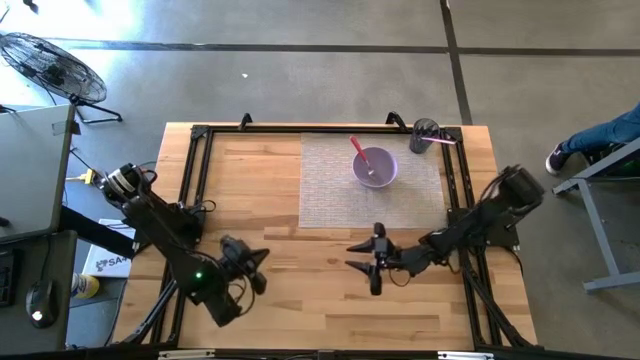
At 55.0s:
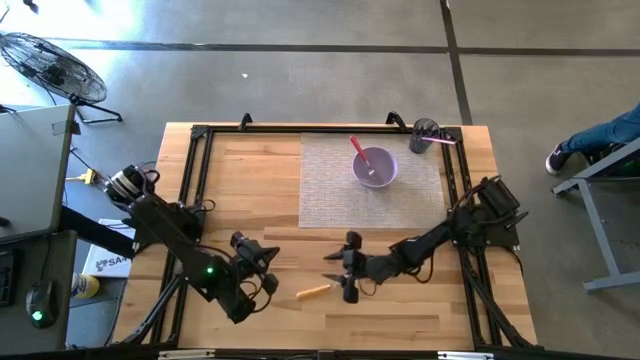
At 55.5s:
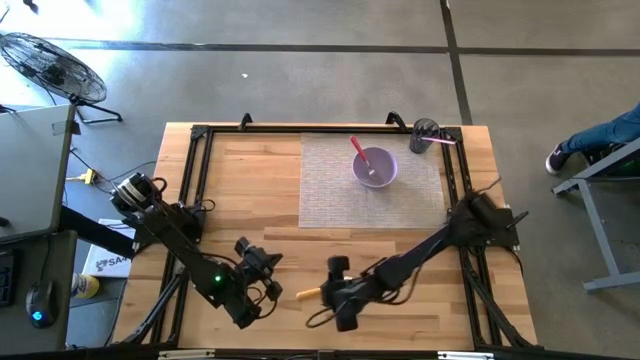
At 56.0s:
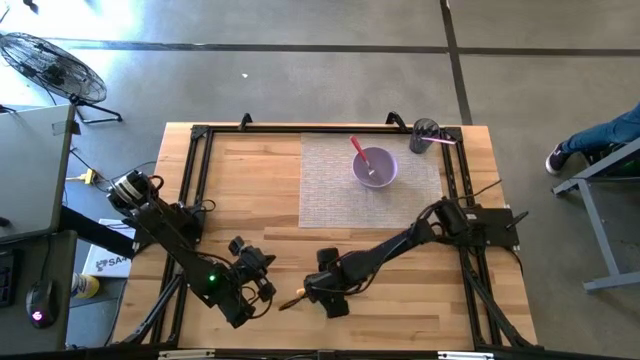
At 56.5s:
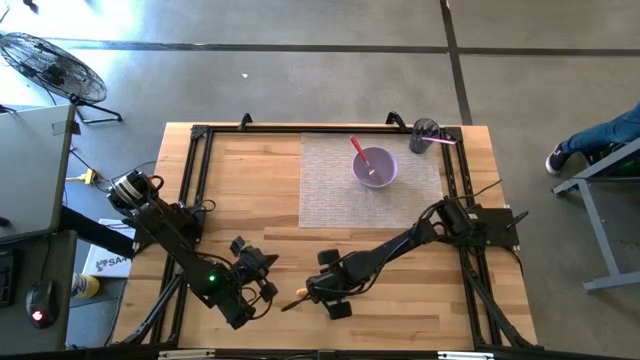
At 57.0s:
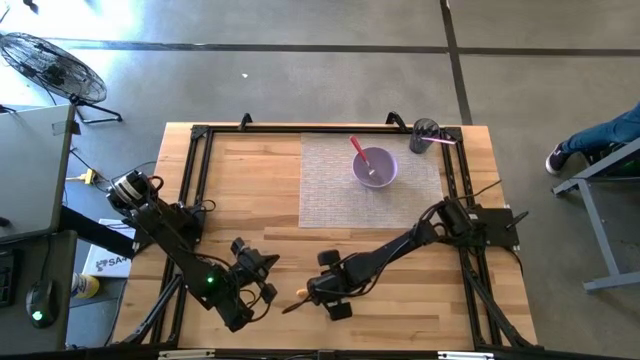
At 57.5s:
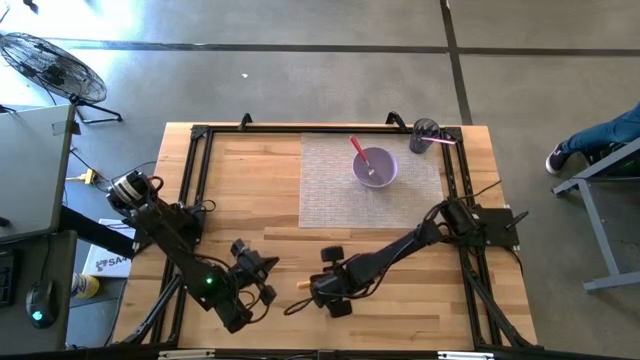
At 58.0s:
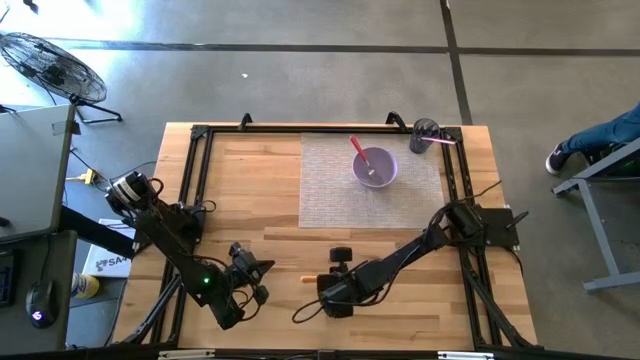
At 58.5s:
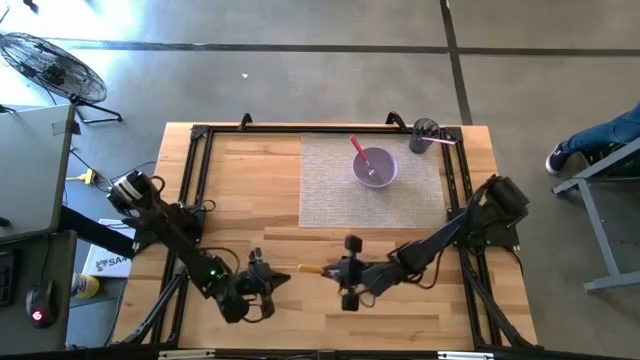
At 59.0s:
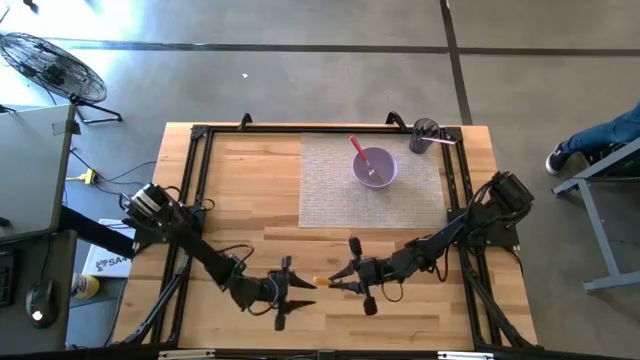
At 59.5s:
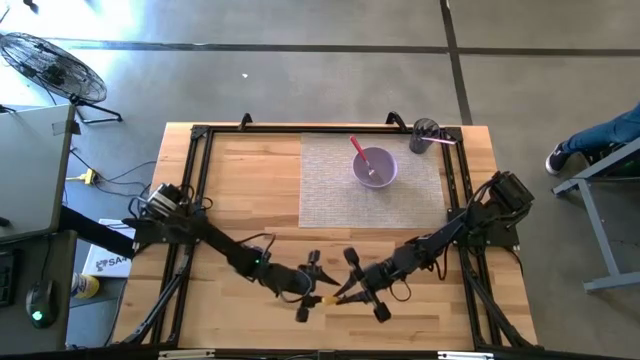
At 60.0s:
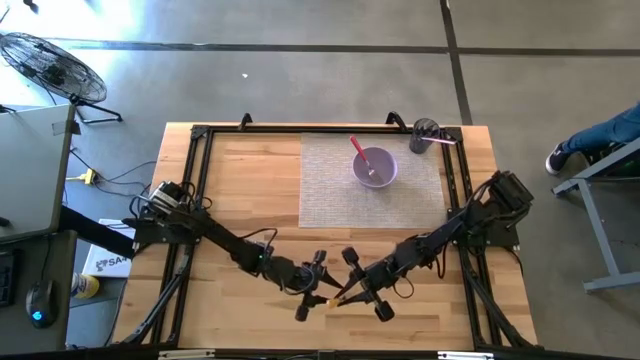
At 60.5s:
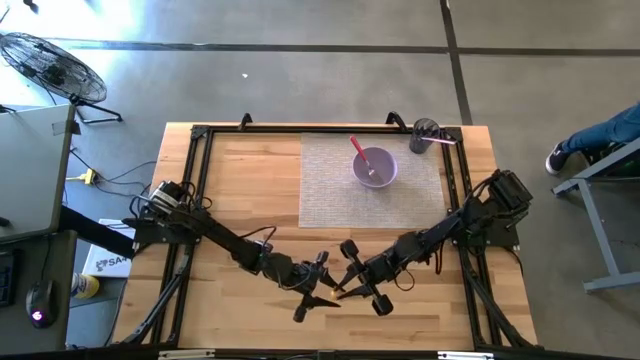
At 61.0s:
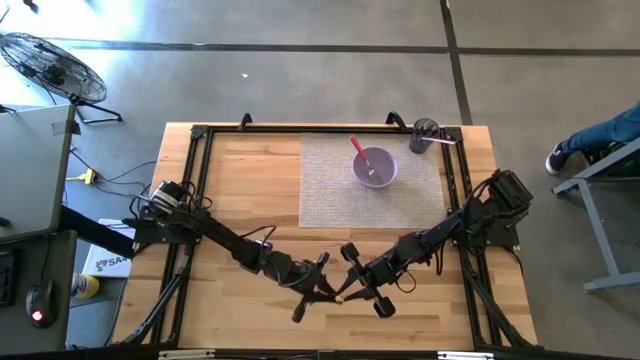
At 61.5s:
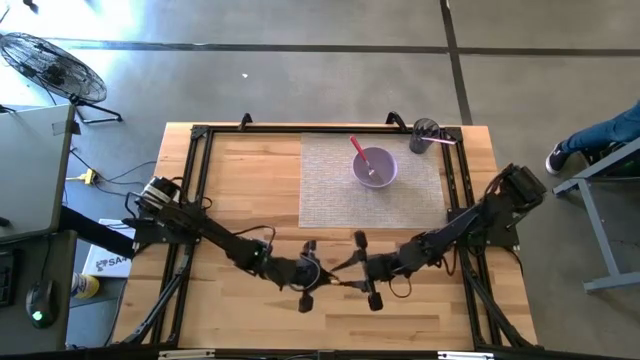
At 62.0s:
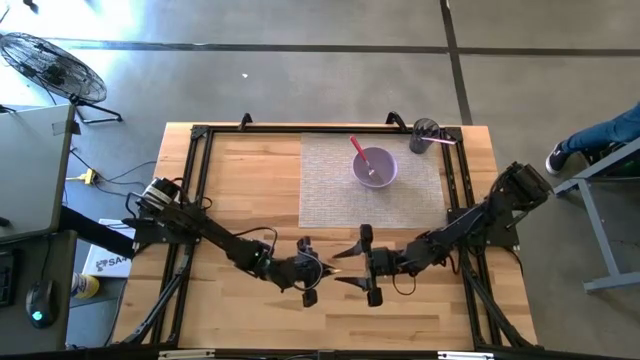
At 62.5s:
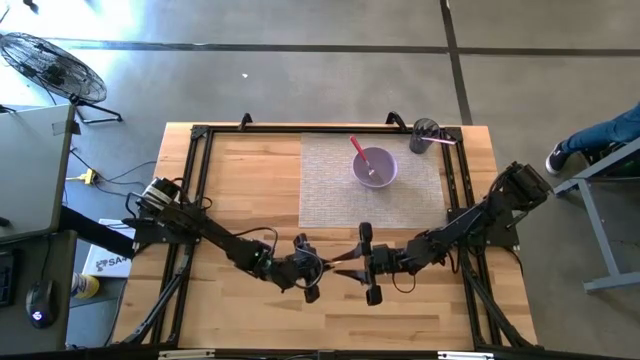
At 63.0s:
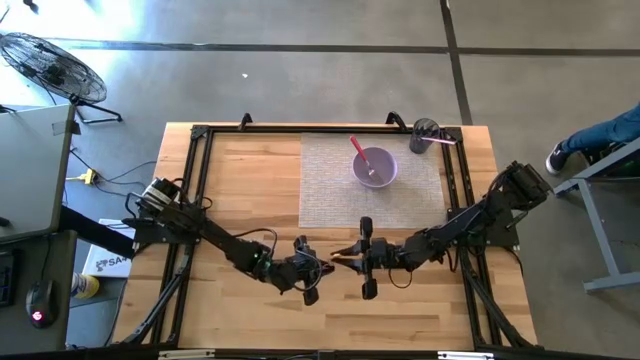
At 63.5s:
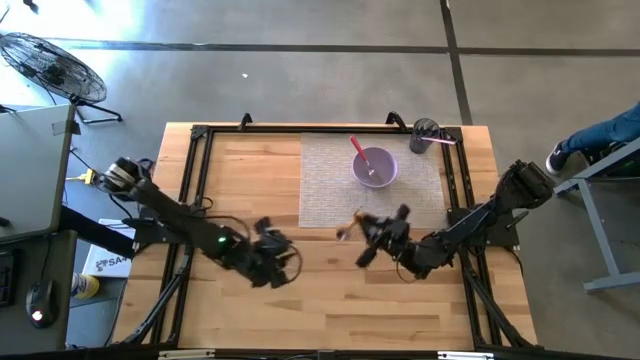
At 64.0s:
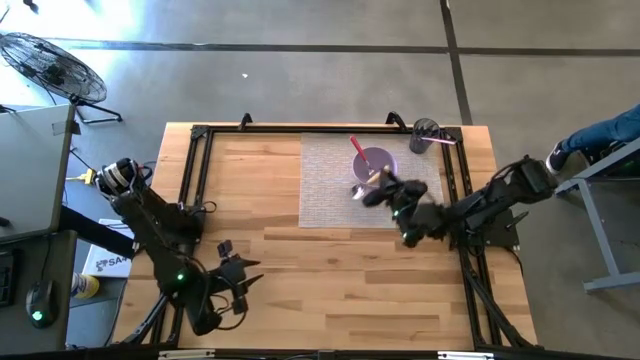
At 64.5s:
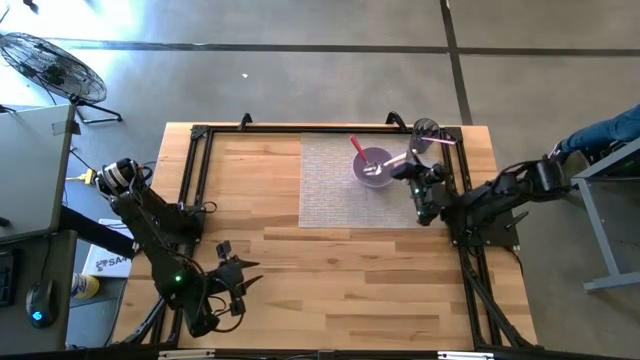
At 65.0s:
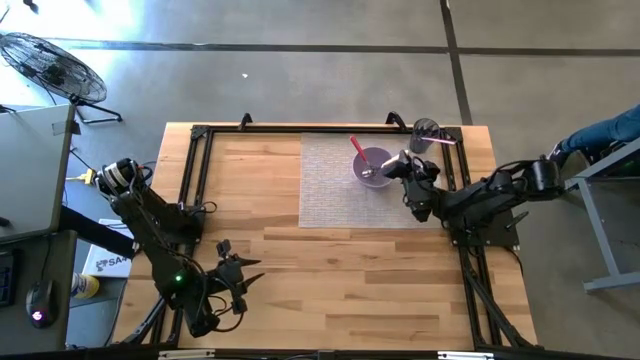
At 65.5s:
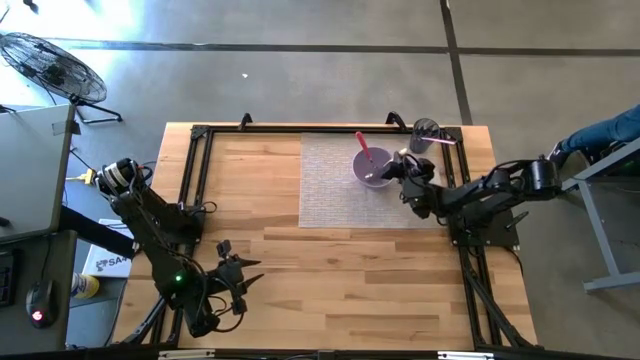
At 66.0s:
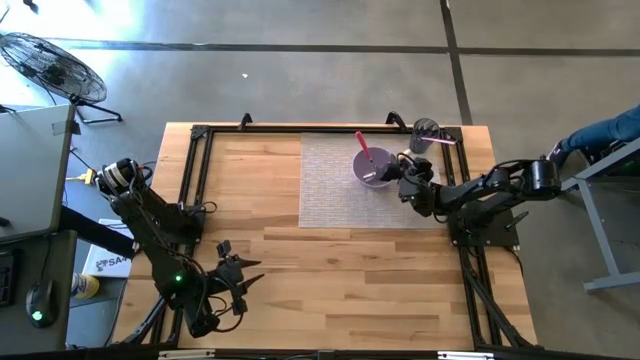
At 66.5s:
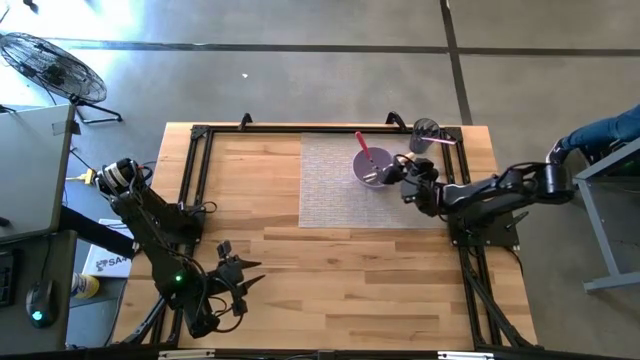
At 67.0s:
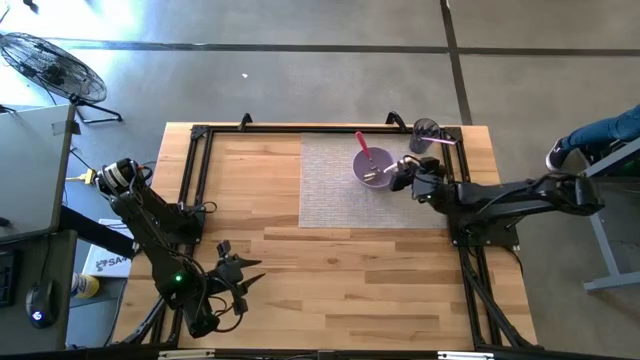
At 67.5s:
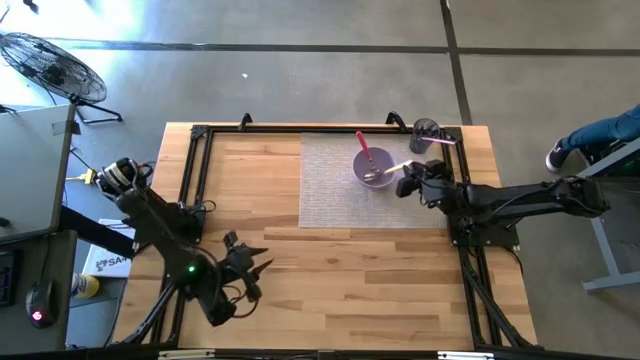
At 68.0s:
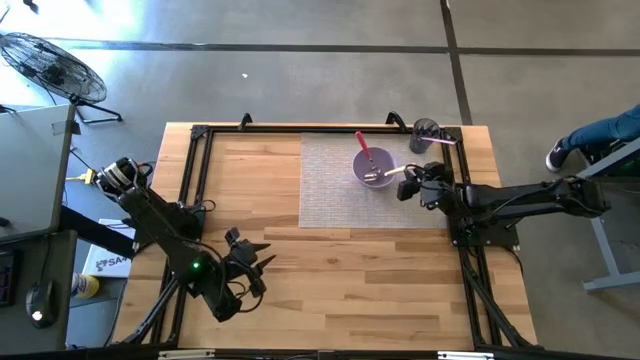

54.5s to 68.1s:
Task: Pick & Place Utensil
Put the yellow spoon into the purple bowl

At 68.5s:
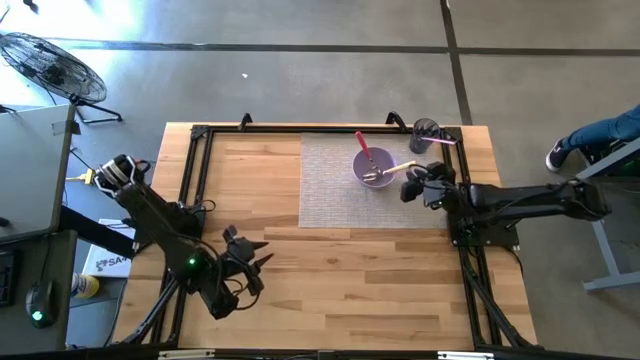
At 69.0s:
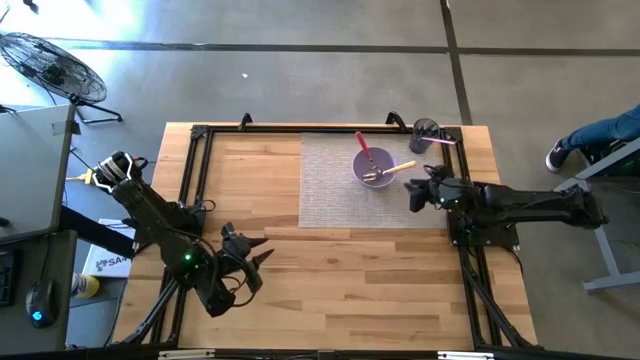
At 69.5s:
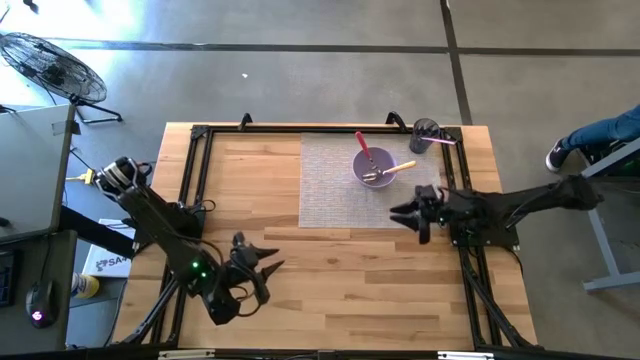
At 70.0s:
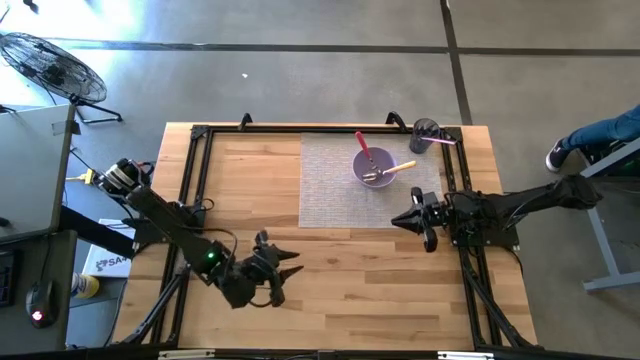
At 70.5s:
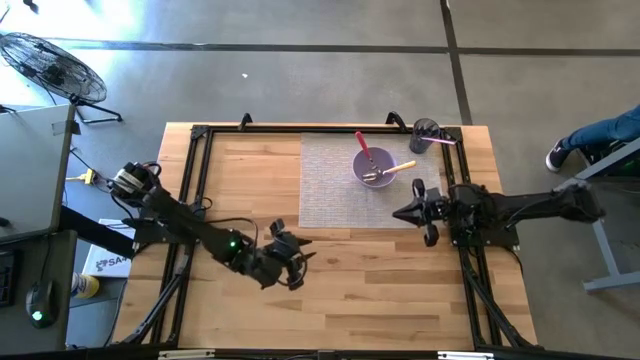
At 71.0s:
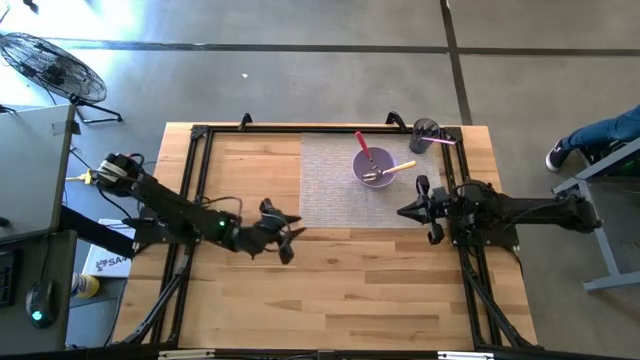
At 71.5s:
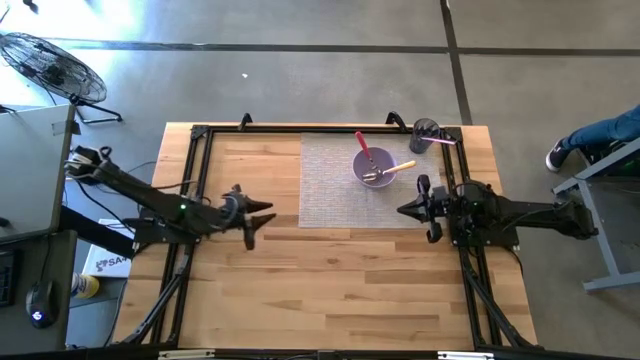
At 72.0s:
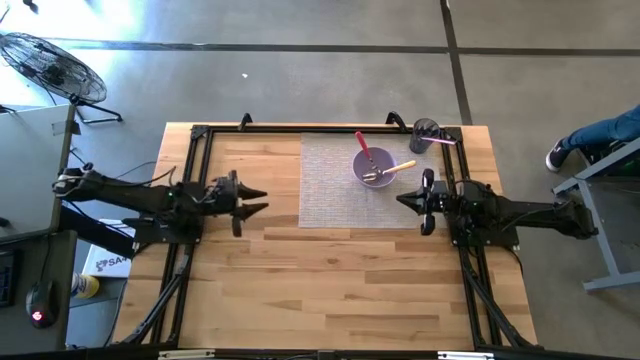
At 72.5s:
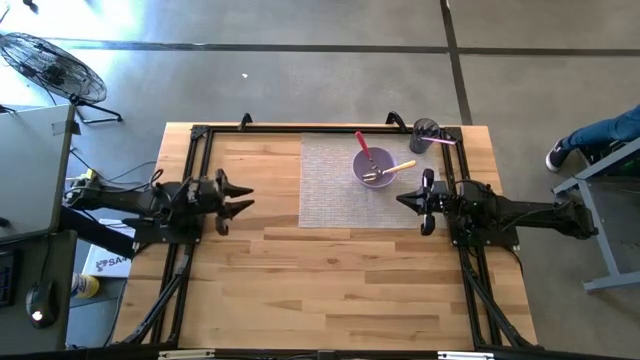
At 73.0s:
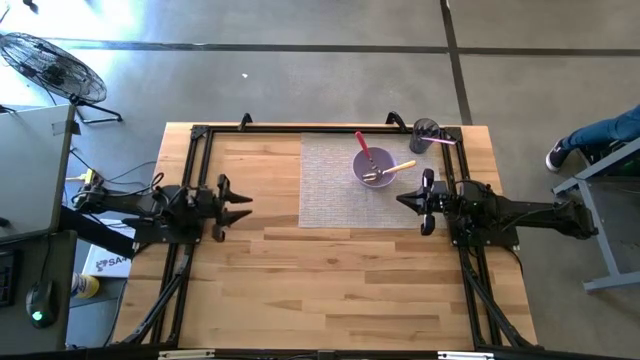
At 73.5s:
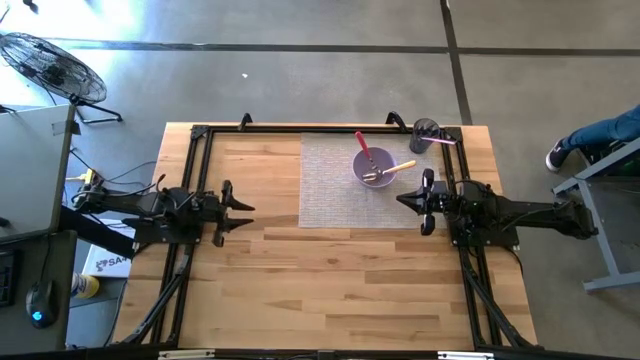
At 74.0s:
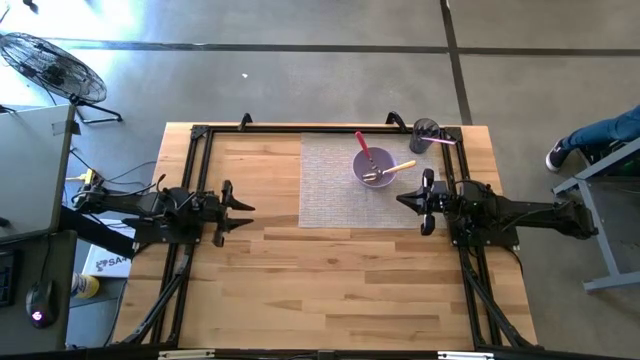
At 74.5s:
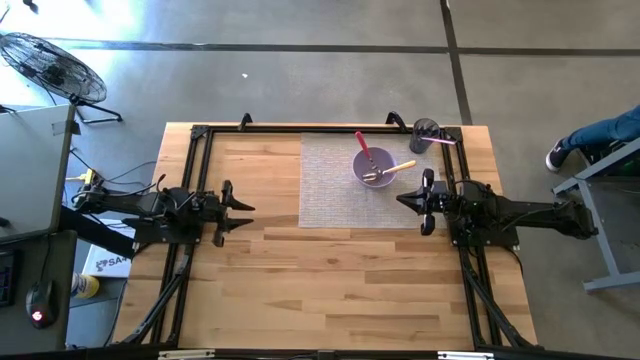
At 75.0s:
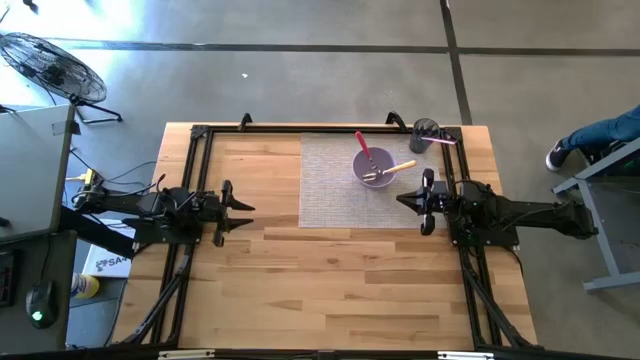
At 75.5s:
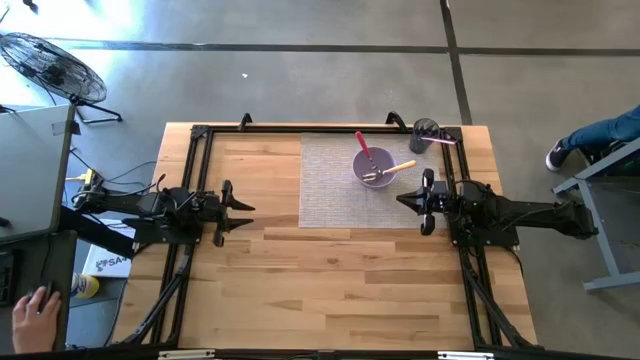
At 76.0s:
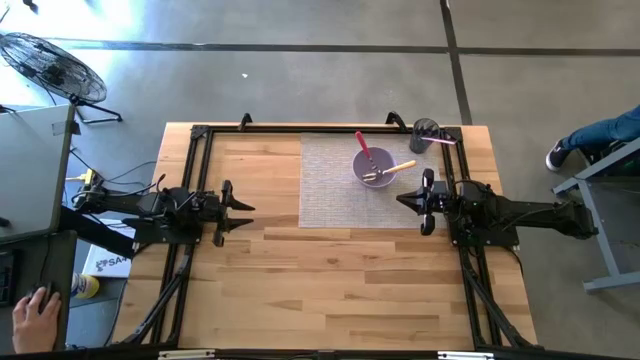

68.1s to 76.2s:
Return to Home Position

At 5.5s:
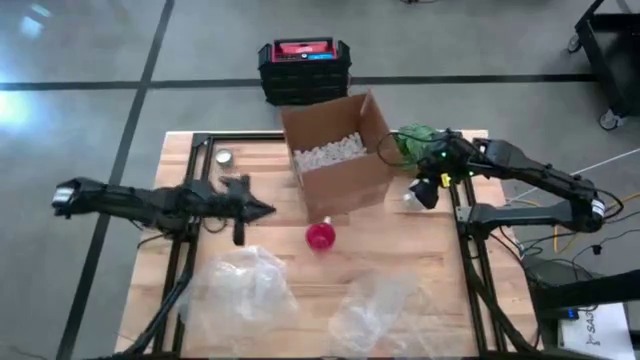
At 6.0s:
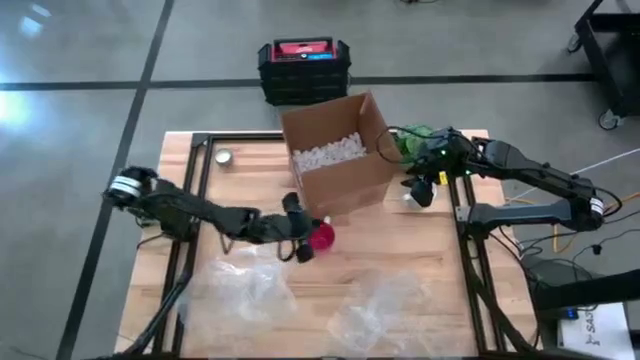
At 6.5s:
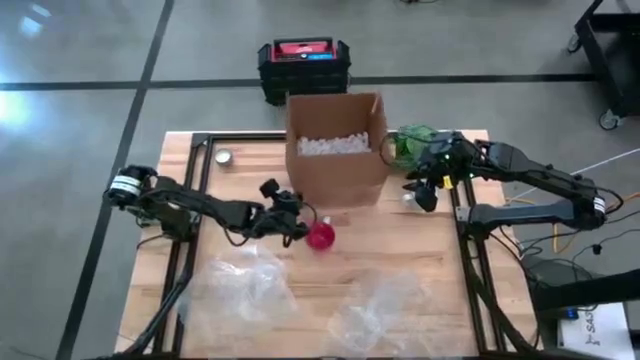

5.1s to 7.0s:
Task: wrap mug
Adjust the brown cardboard box
